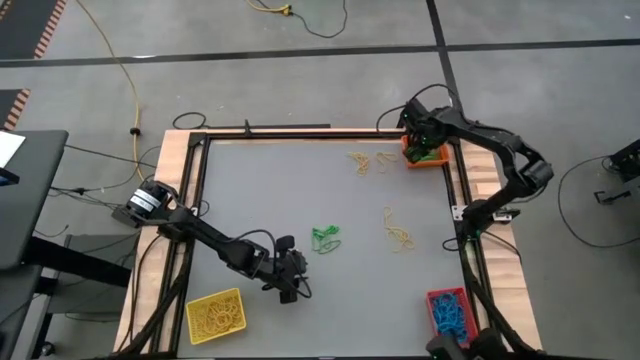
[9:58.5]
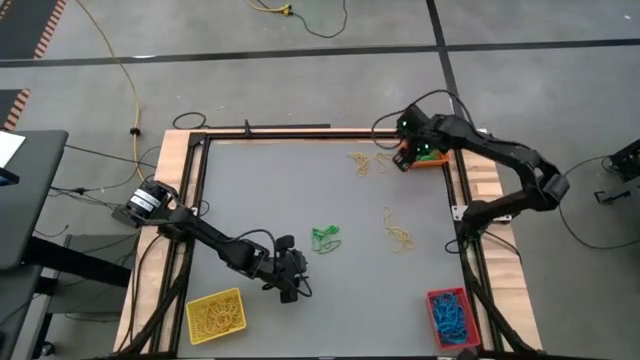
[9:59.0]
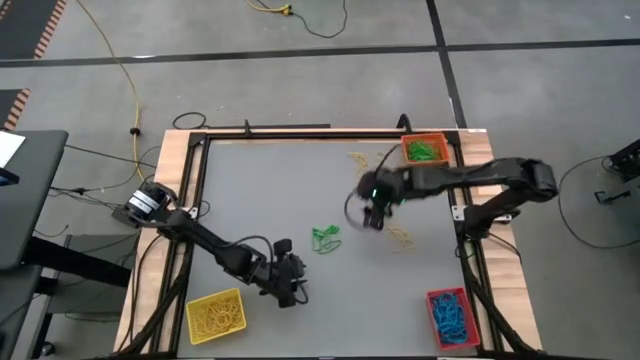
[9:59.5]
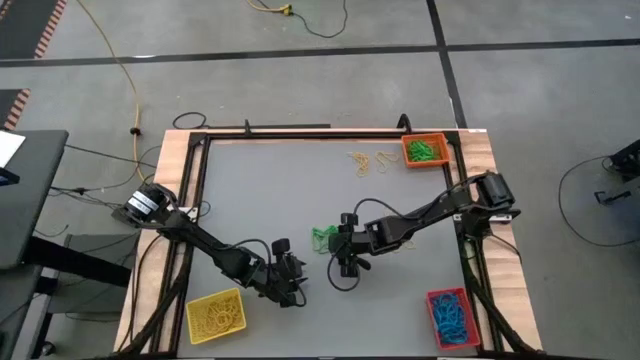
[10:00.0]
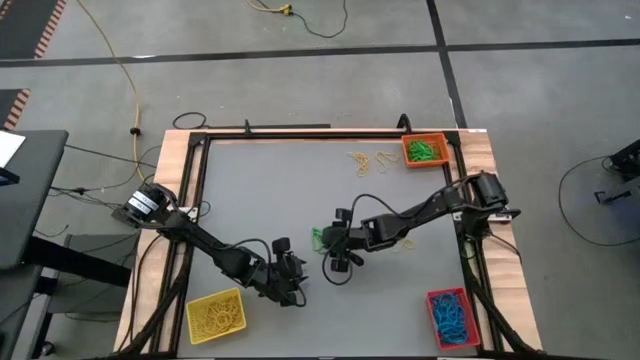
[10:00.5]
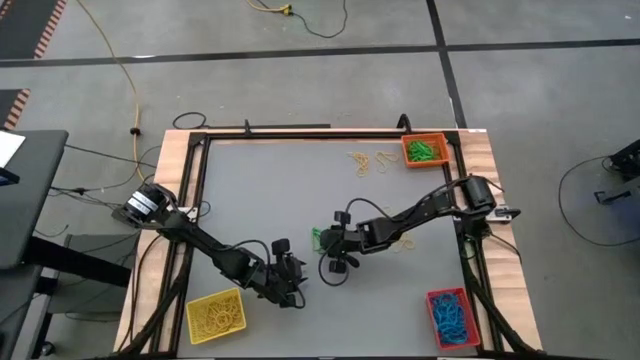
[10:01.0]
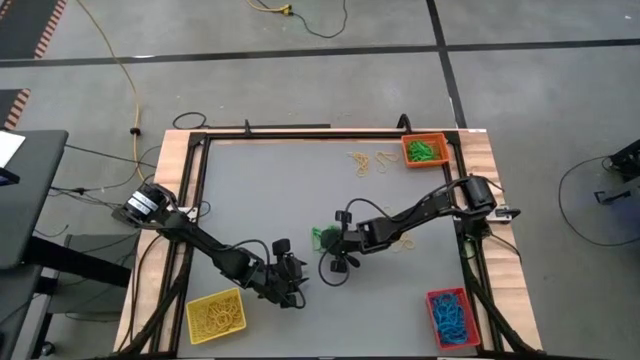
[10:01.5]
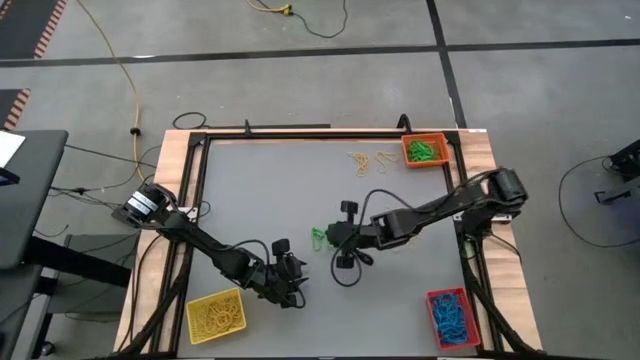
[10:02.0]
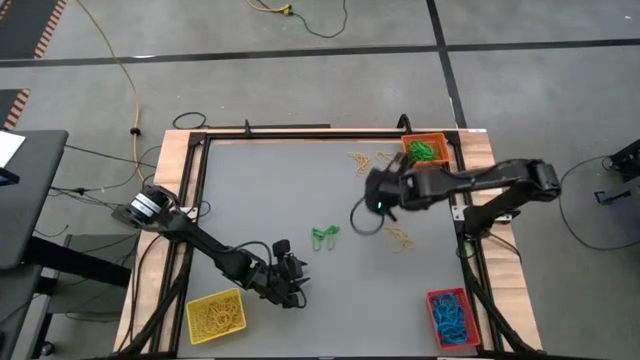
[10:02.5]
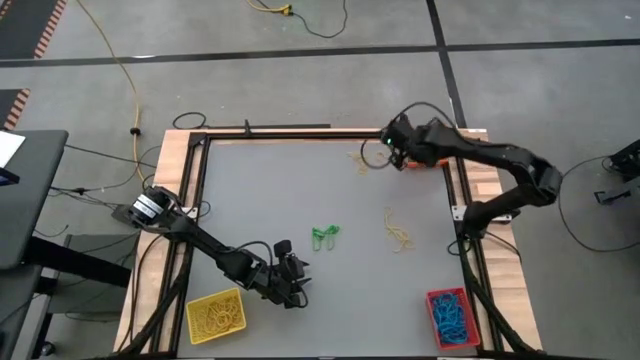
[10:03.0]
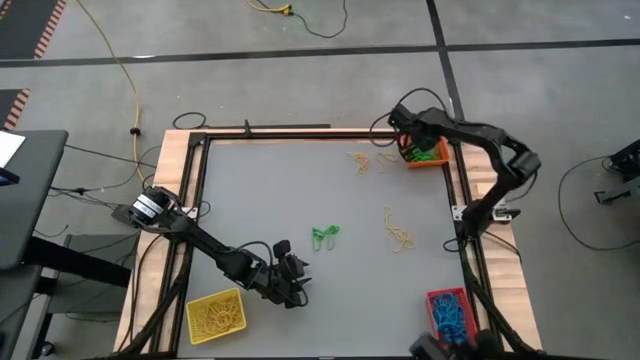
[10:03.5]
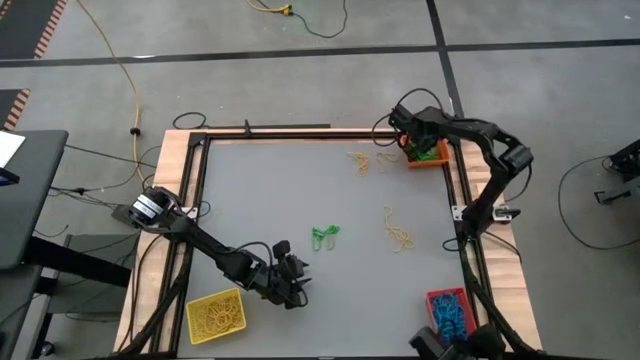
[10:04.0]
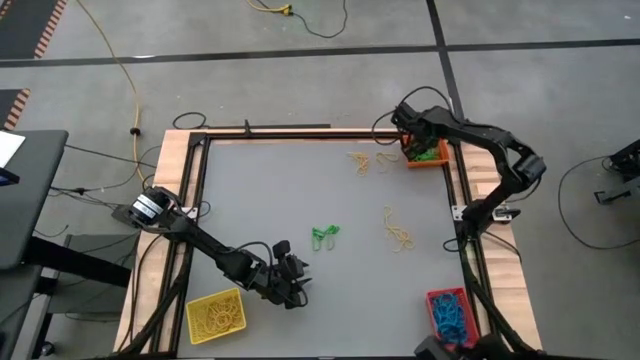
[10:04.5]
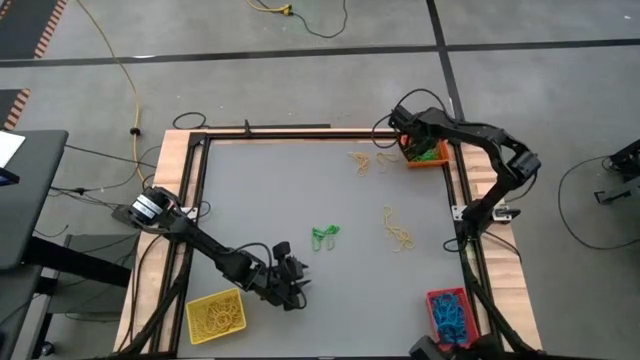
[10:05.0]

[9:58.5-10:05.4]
Task: Sort rubber bands into baskets
Put the green rubber band into the orange bin

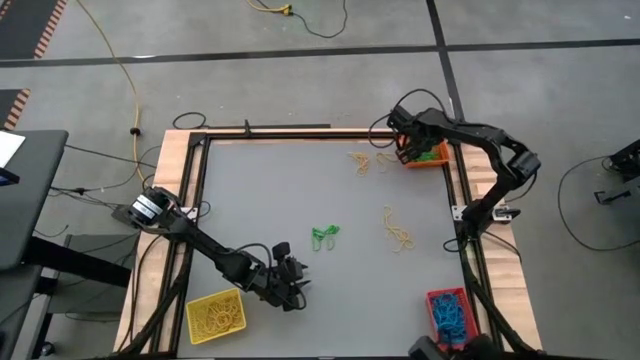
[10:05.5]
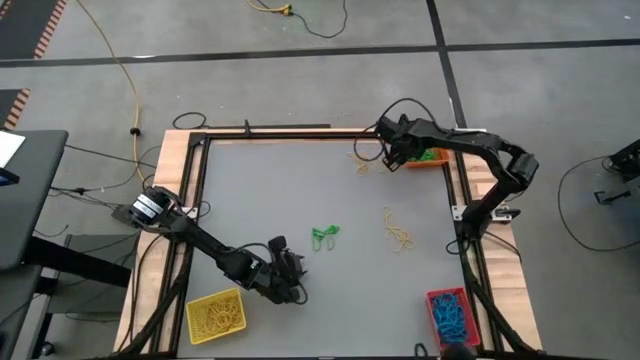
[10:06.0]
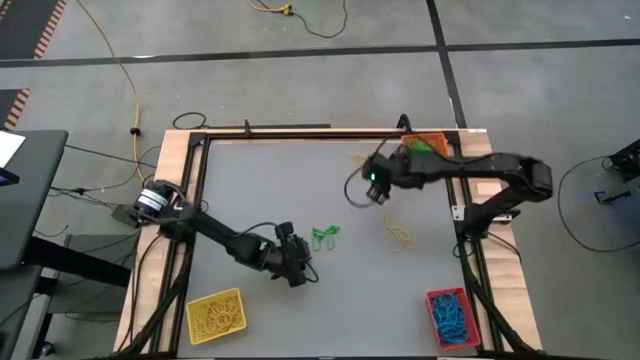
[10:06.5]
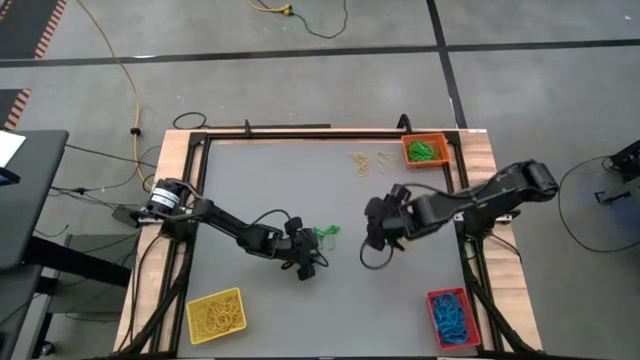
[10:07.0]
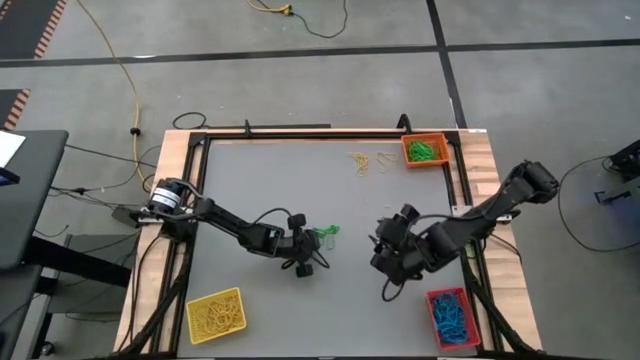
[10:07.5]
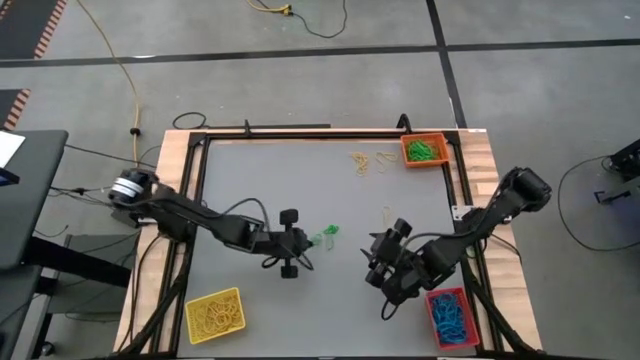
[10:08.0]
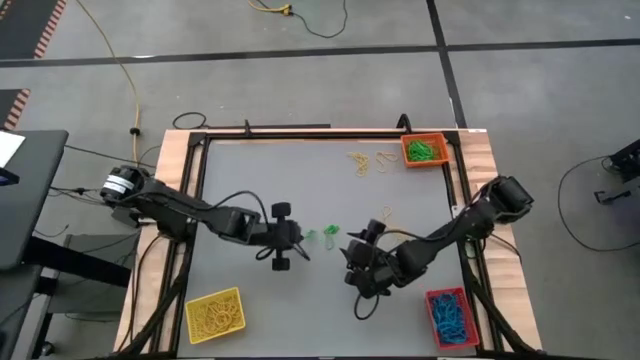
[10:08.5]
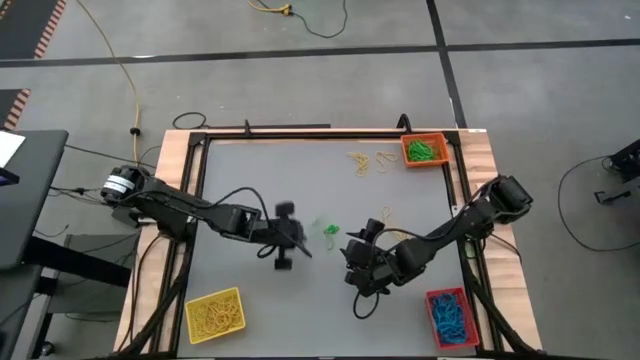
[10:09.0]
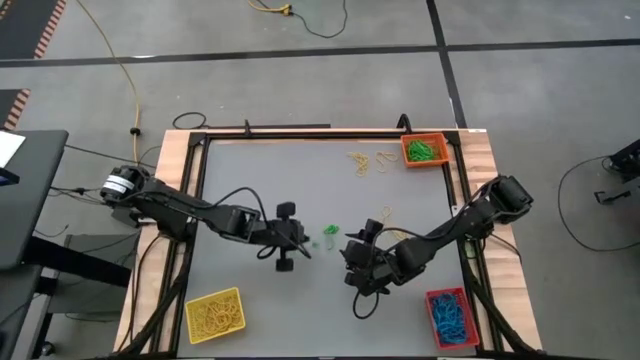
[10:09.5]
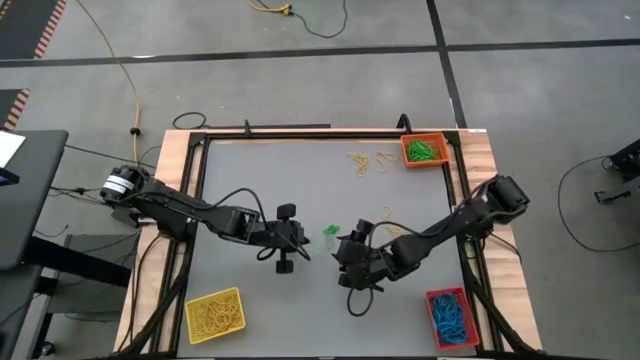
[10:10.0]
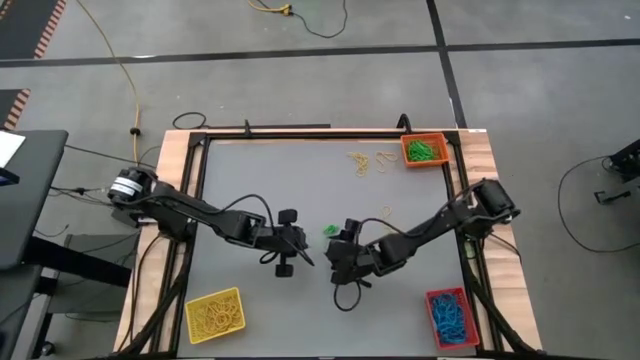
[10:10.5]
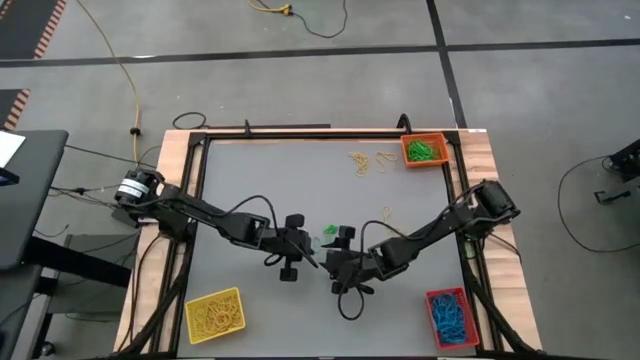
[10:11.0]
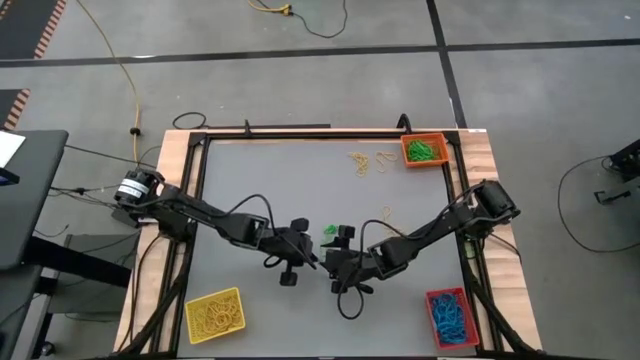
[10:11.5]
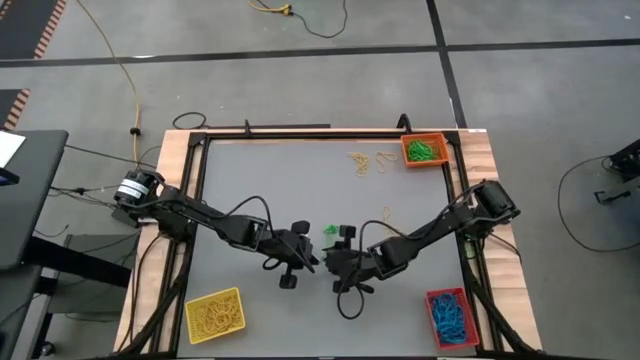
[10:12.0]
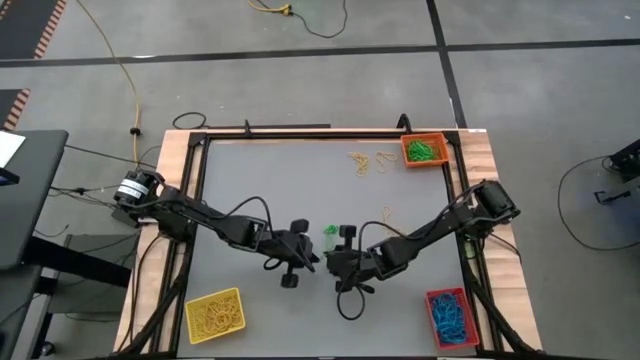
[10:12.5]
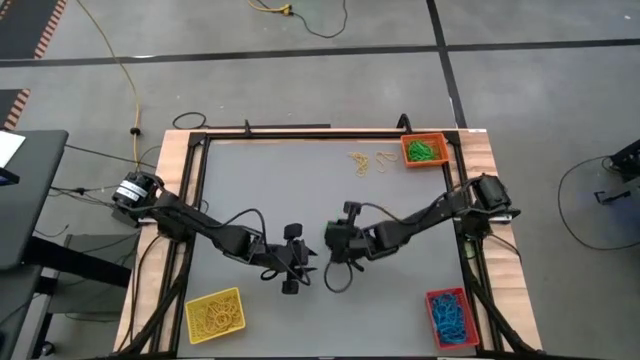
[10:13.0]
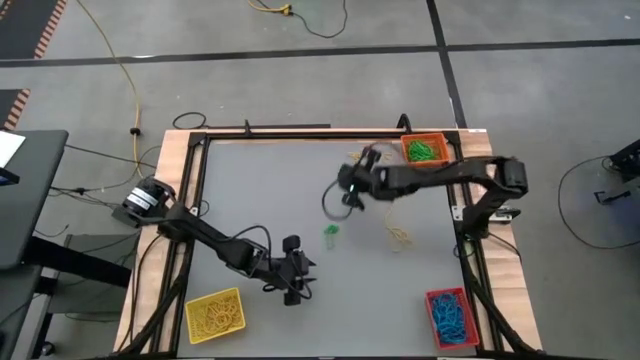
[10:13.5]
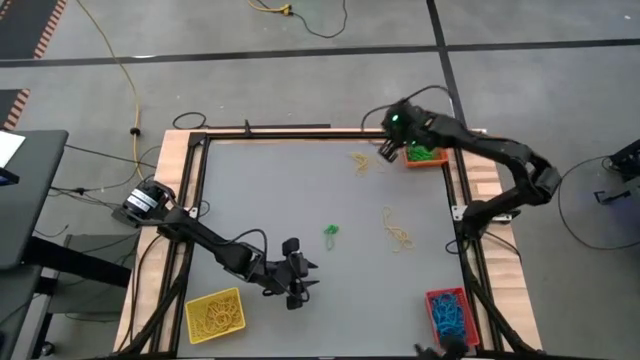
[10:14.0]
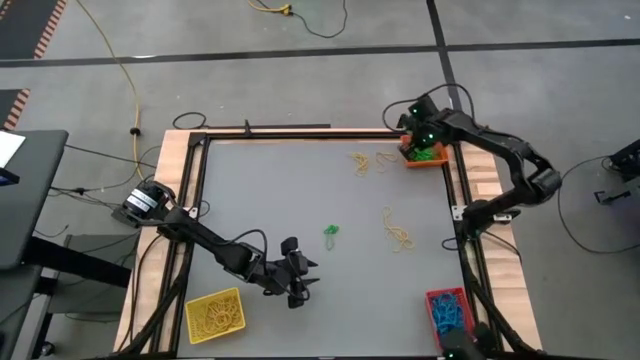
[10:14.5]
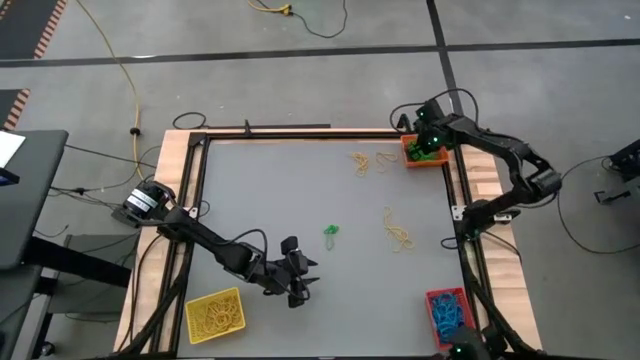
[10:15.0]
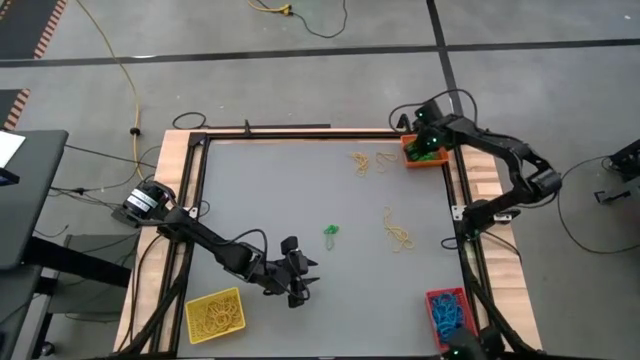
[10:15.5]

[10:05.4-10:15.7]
Put the green rubber band into the orange bin

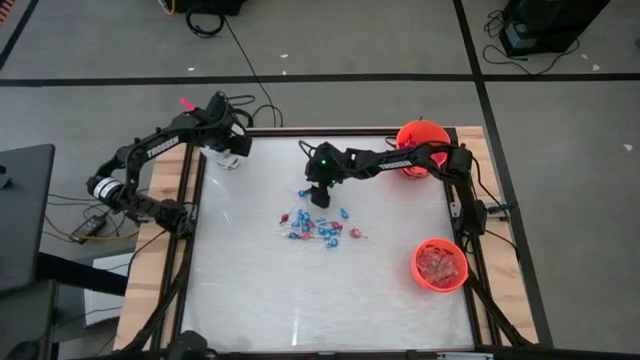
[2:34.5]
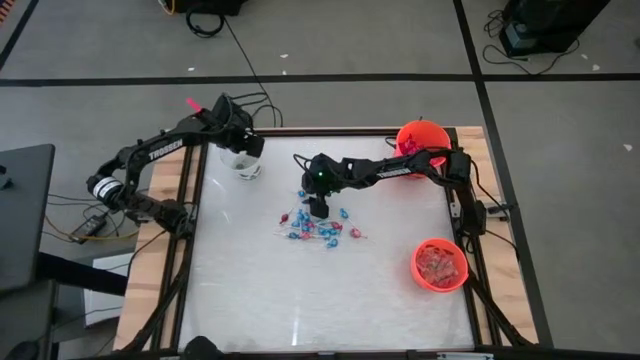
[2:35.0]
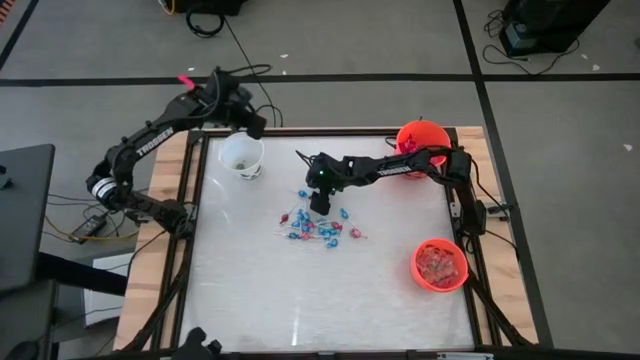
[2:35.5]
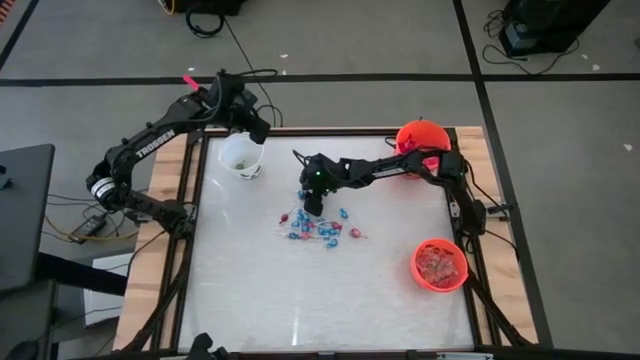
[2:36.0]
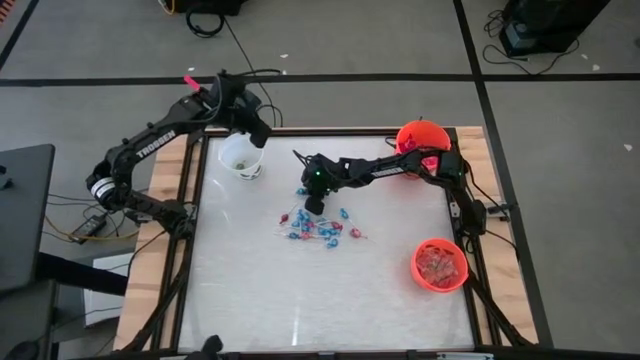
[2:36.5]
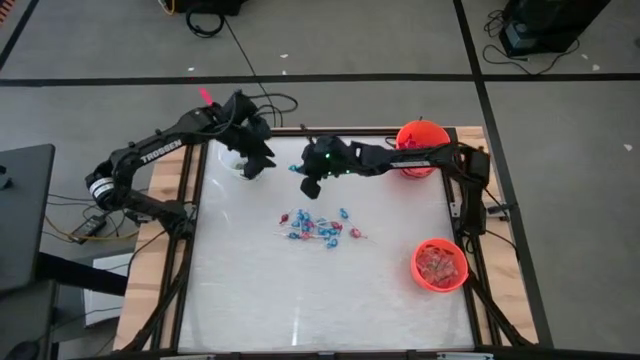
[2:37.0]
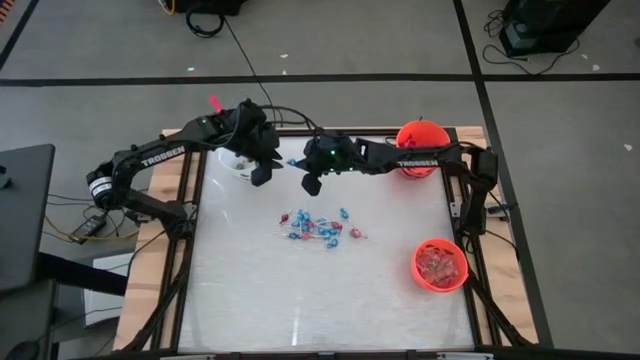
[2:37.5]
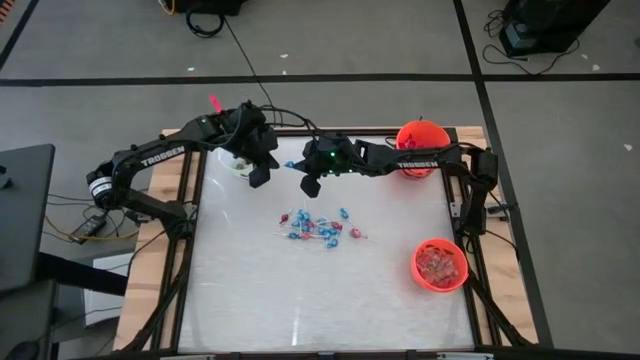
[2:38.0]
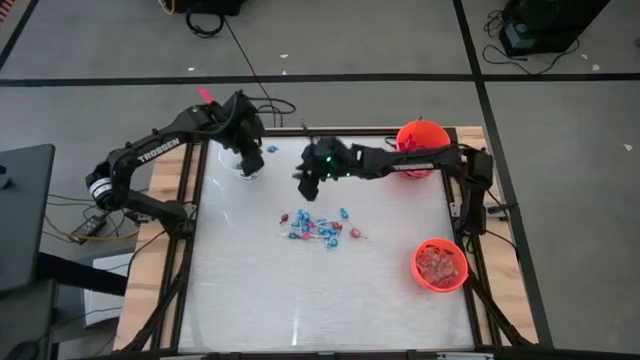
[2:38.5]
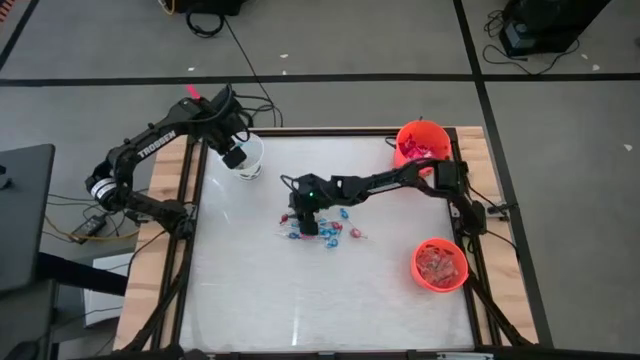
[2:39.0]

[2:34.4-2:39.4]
Task: Sort candy by brand, put in halloween buckets
Put the blue candy into the white bucket
